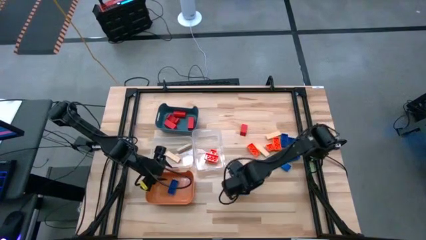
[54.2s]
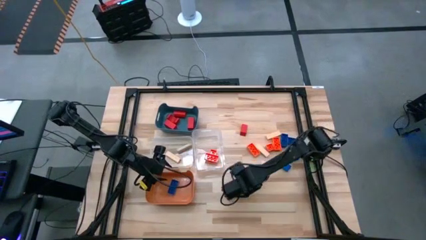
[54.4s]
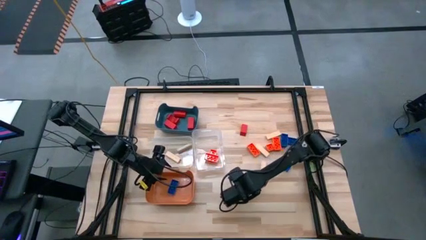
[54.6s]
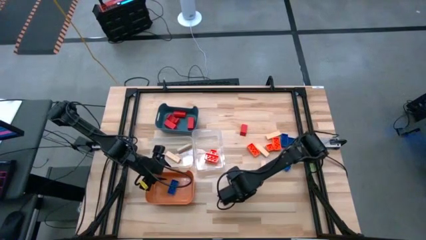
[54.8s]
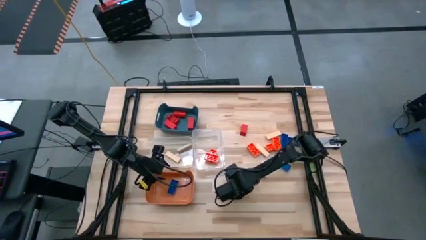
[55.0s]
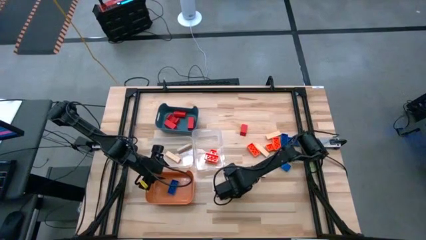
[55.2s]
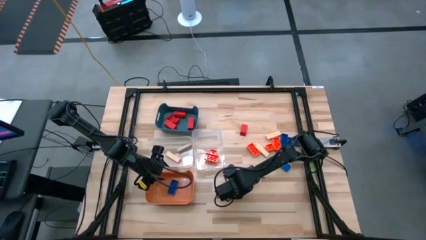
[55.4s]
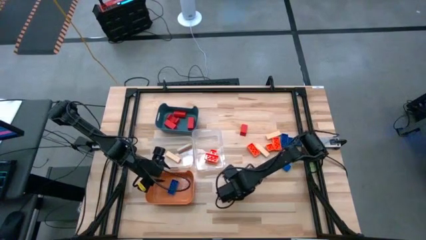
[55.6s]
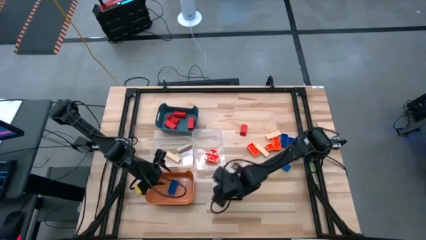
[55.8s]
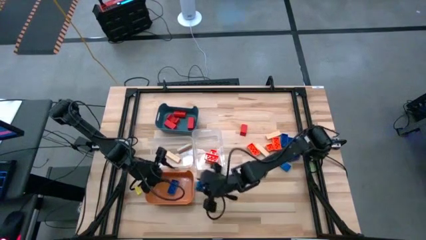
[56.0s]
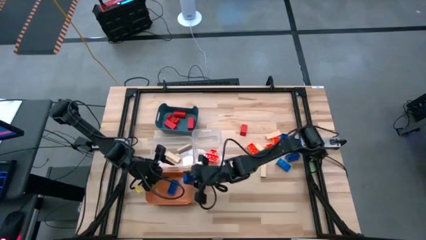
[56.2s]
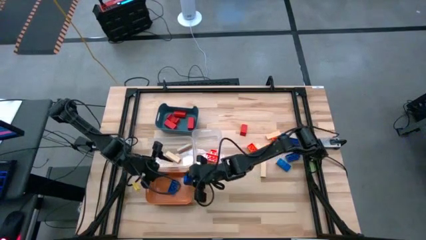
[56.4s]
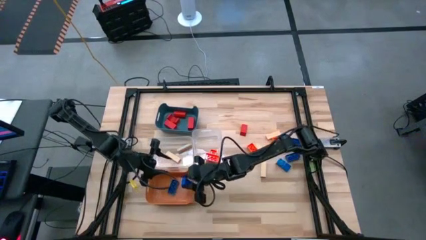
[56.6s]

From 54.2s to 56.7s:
Task: Sort blocks
Put the blue game piece into the orange bin

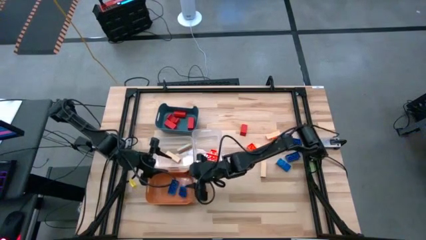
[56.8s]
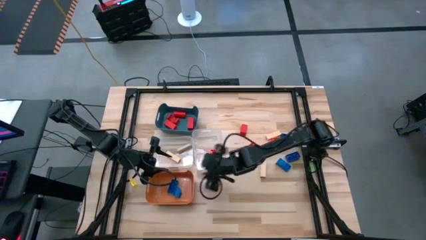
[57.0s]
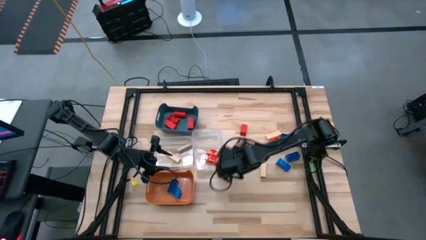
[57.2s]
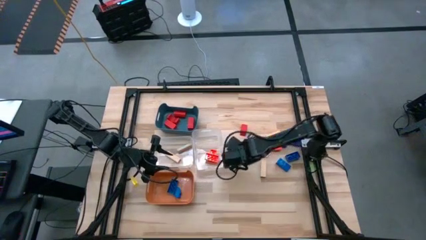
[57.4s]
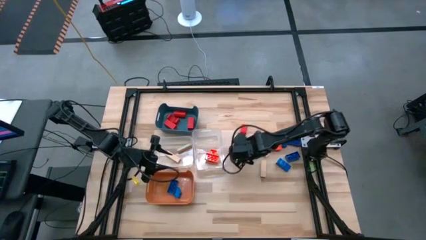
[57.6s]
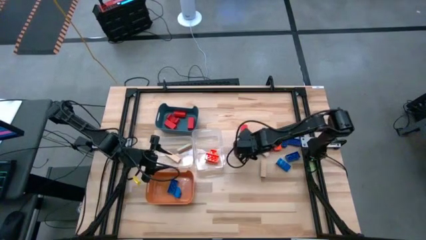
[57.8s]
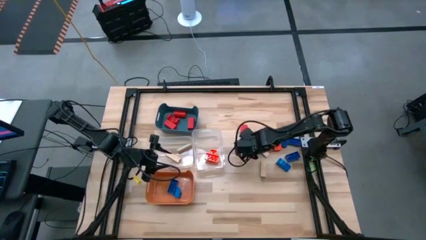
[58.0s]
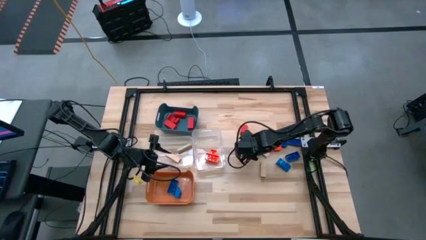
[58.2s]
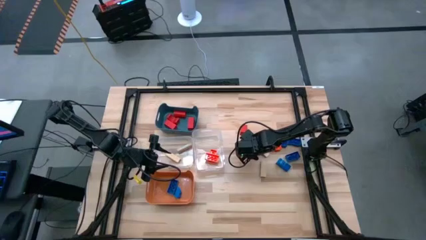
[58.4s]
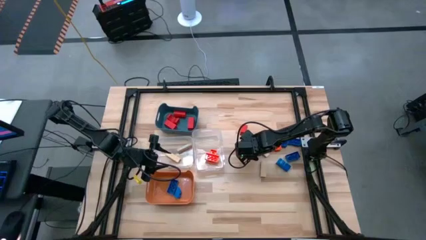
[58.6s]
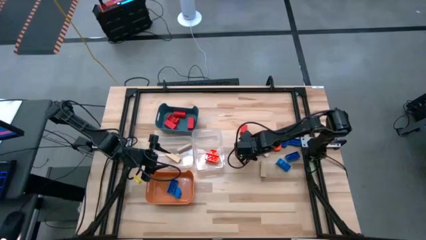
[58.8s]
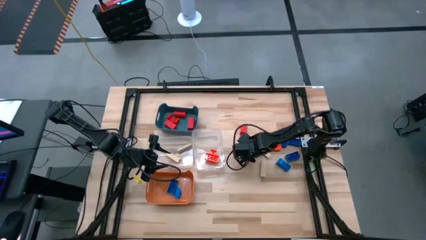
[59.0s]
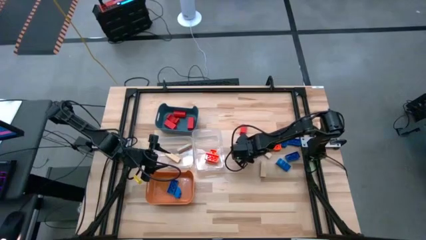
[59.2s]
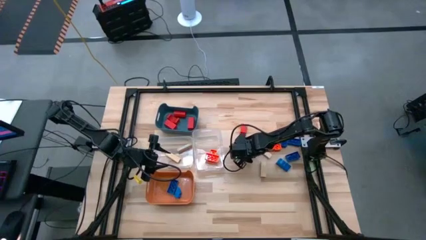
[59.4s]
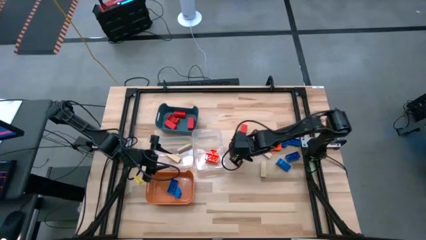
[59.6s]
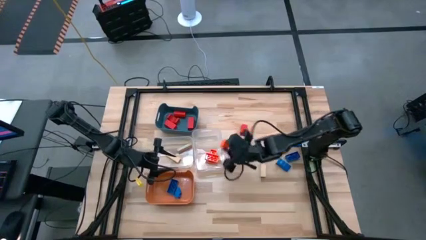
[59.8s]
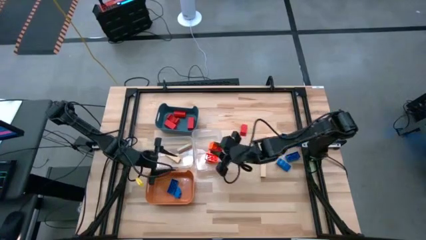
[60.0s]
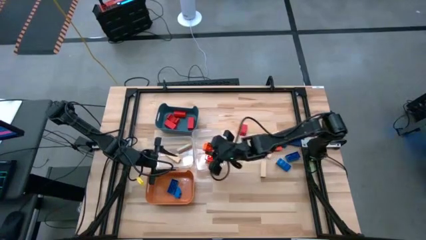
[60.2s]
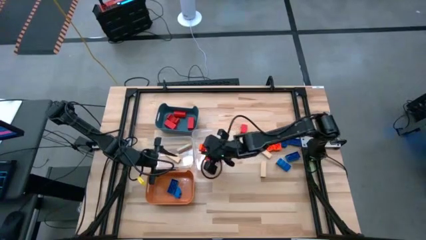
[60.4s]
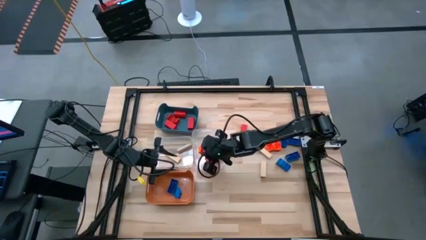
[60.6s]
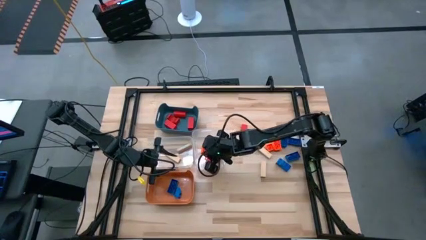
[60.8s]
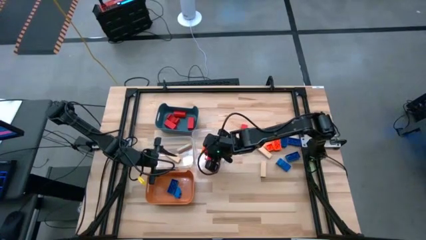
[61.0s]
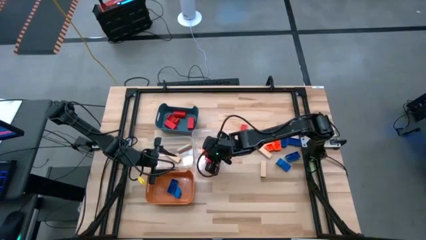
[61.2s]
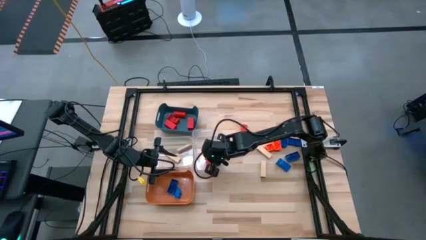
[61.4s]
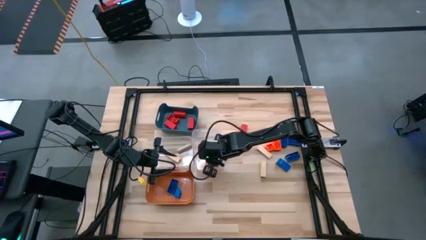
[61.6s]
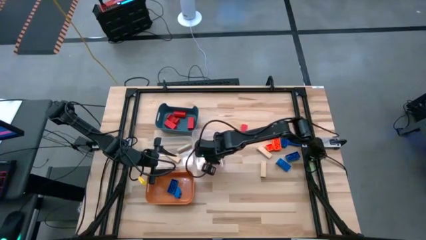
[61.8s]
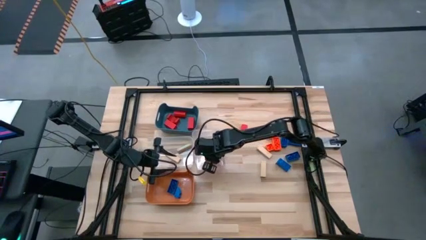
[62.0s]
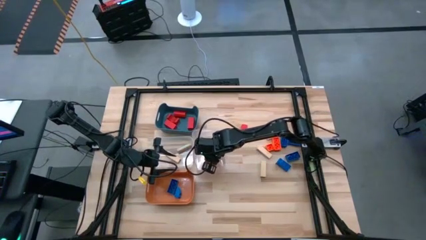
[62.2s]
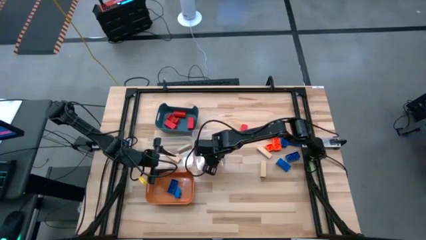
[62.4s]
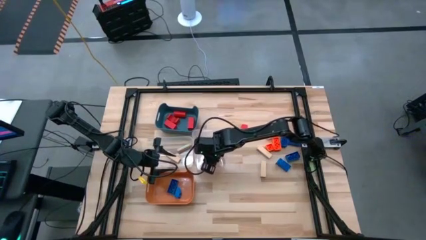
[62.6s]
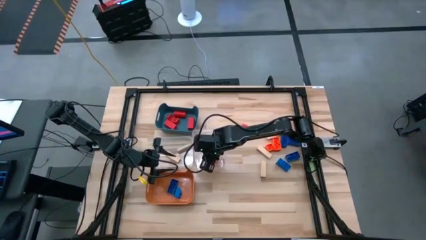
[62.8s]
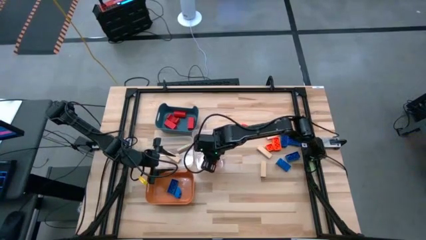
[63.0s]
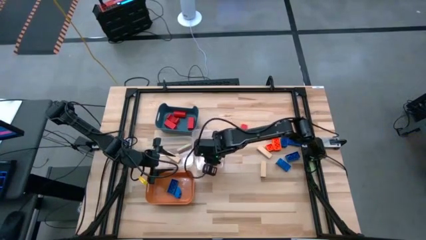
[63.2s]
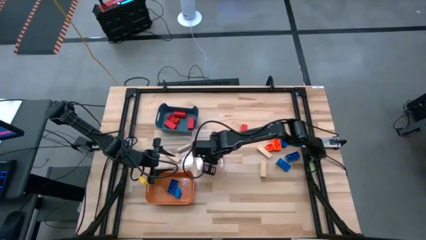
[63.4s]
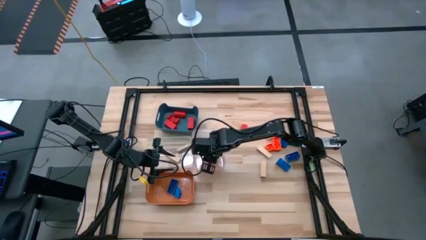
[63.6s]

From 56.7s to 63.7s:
Put the orange game piece into the right transparent bin

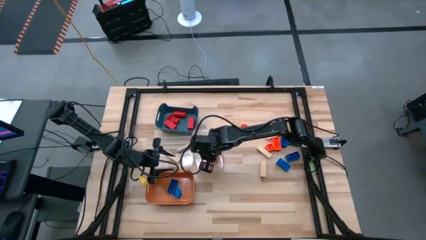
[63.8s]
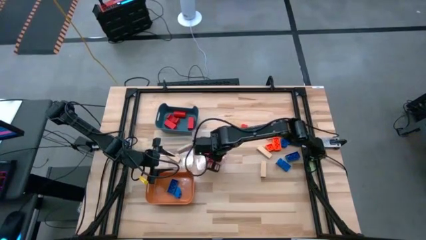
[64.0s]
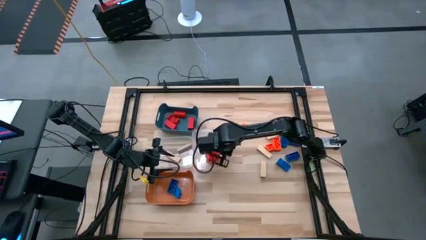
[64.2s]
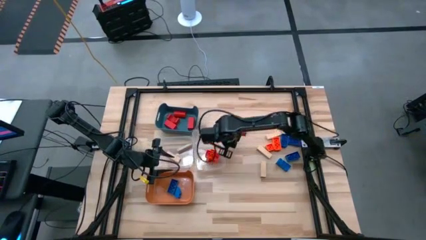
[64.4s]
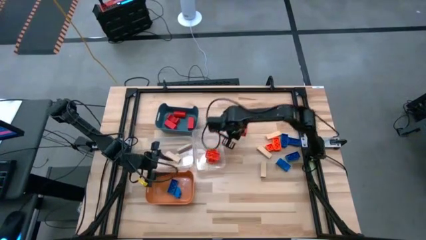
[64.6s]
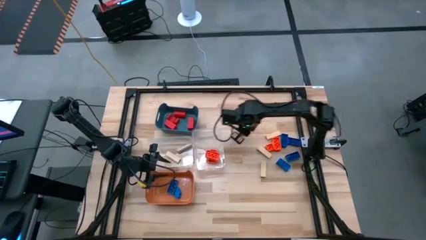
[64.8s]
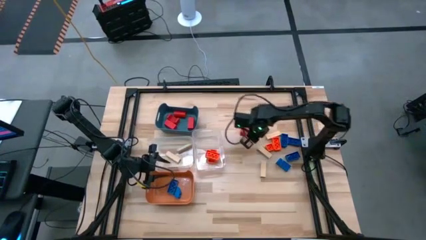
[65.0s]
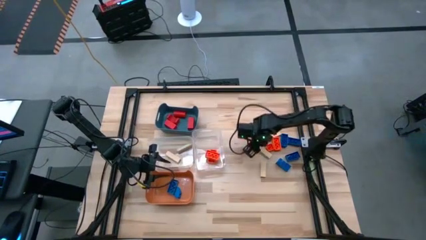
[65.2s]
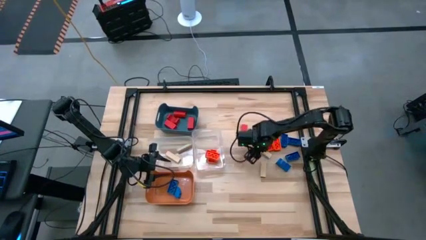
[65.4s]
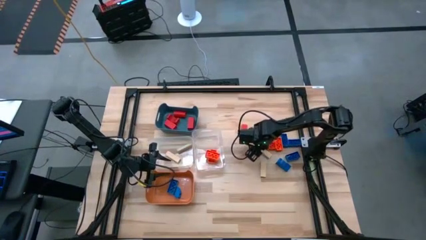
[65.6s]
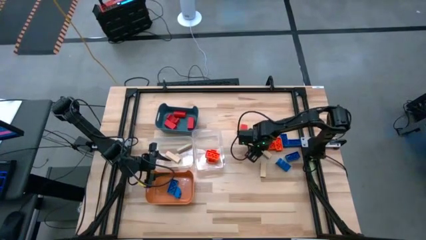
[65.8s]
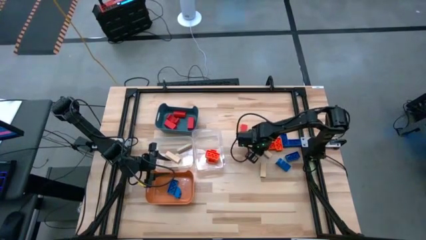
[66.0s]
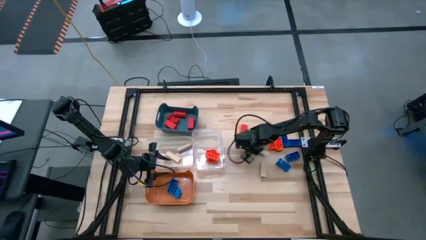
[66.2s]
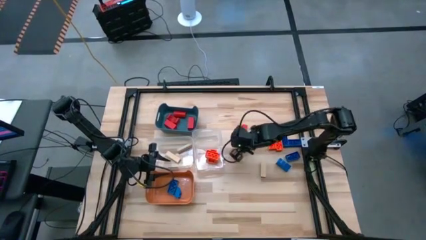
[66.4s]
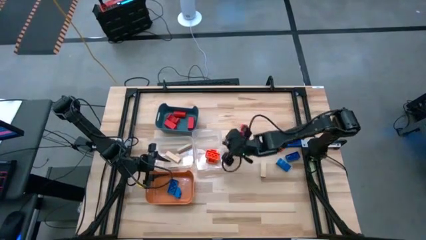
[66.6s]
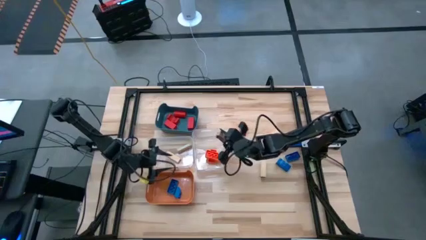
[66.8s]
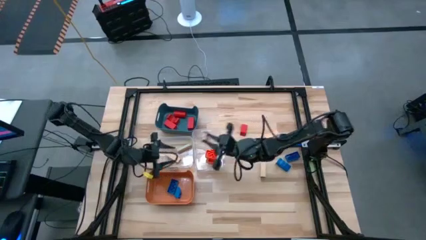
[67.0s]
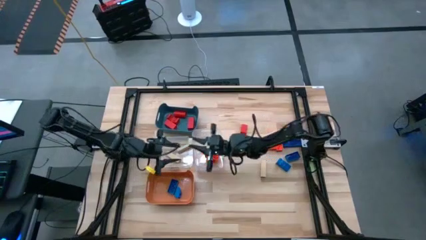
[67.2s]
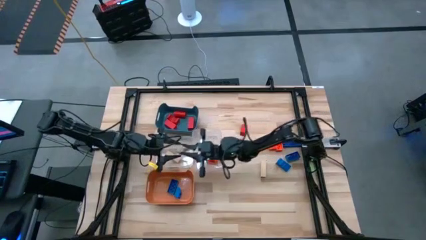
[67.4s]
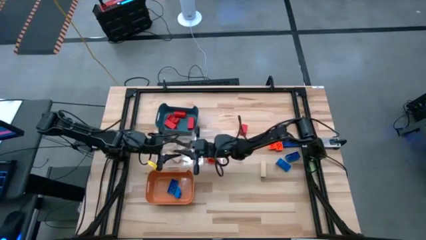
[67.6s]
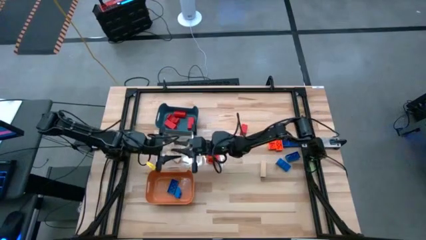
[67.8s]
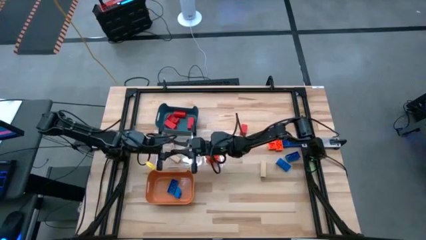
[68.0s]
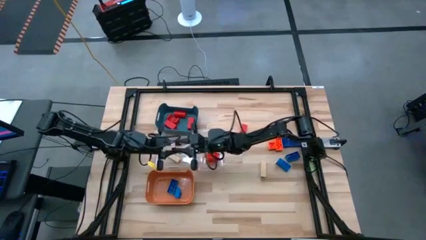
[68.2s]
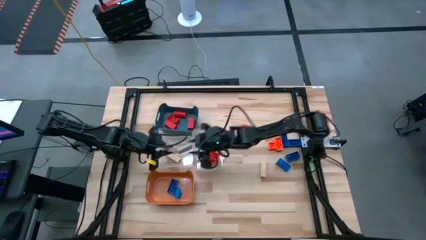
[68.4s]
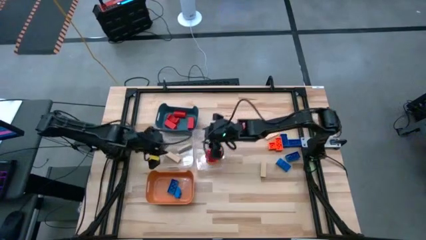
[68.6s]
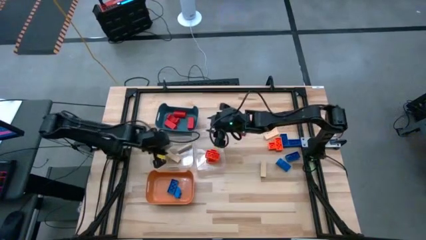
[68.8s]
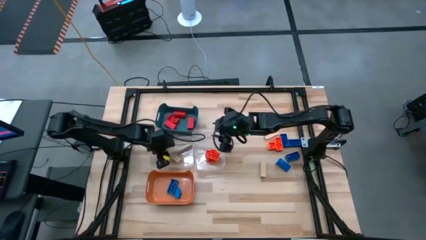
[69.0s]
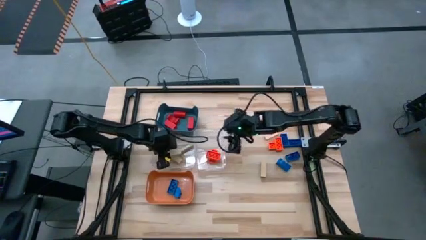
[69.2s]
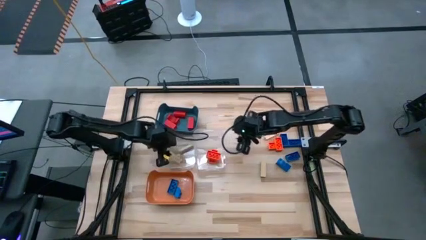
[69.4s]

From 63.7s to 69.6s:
Put the brown block into the left transparent bin

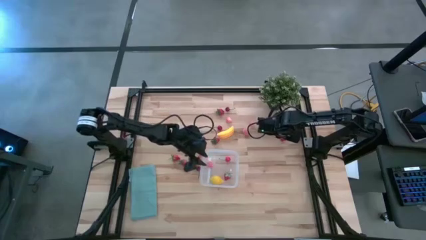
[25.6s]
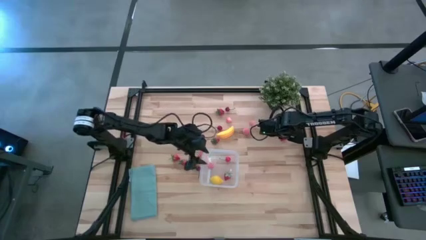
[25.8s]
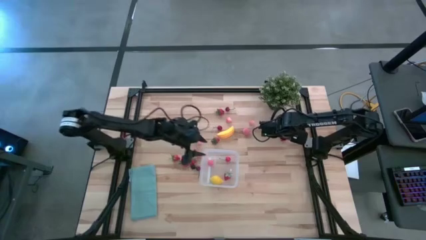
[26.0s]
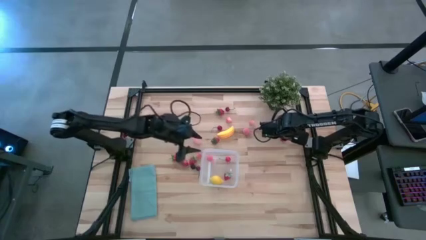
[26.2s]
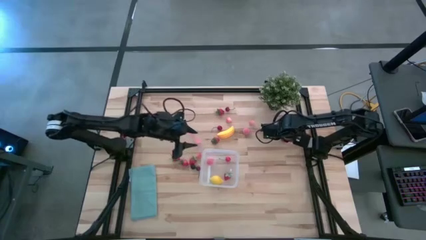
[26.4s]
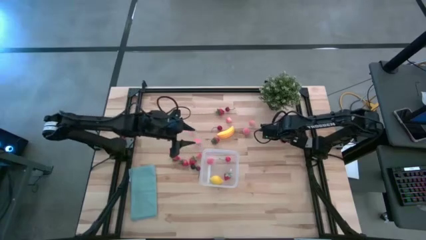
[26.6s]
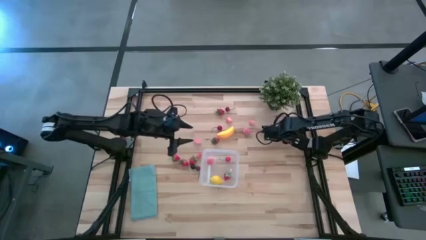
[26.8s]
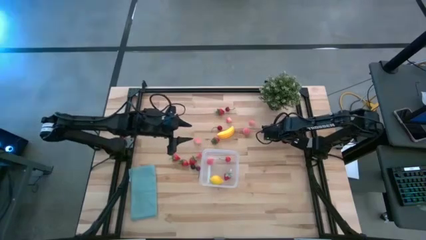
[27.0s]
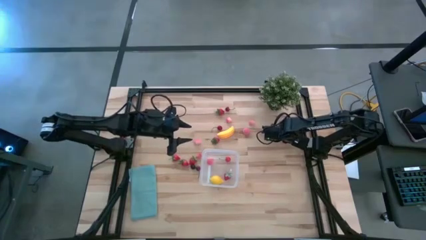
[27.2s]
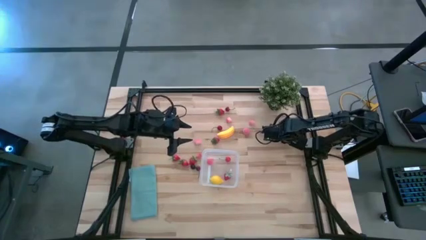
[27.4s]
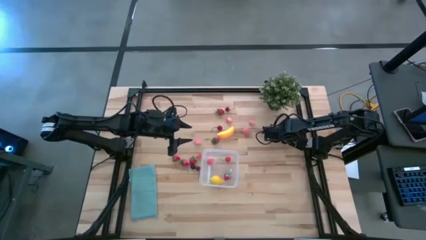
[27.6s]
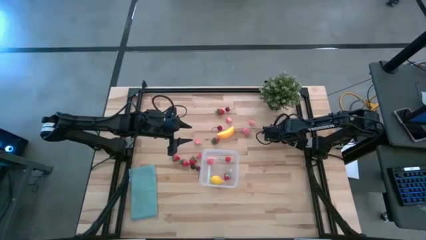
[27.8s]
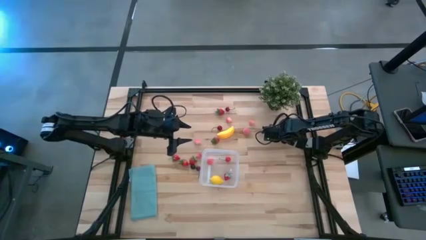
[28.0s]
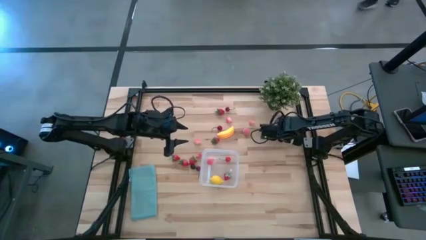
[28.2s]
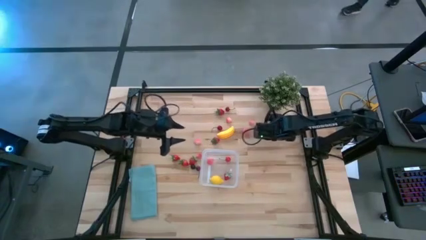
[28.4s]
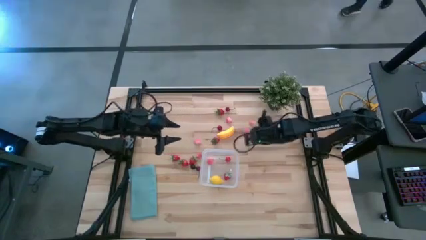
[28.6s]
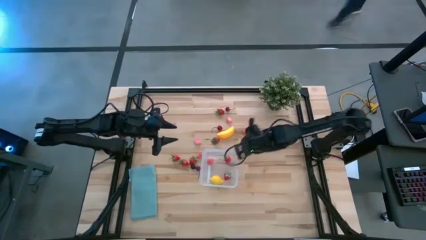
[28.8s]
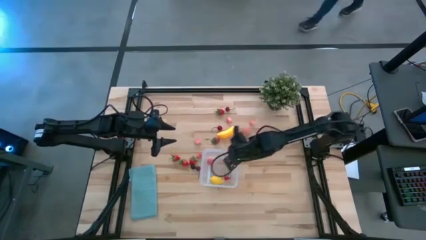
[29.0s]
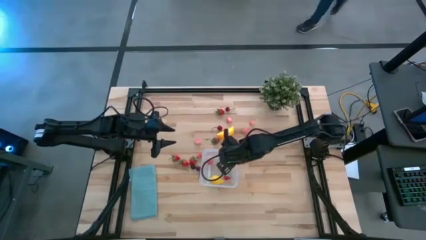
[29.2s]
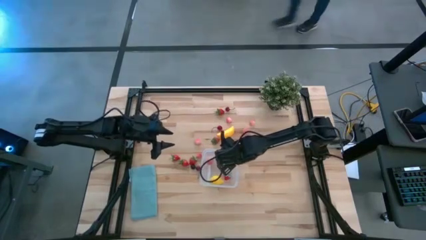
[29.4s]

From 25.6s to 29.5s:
Task: Pick and placing Produce into tupperware
Put the red strawberry into the transparent container
